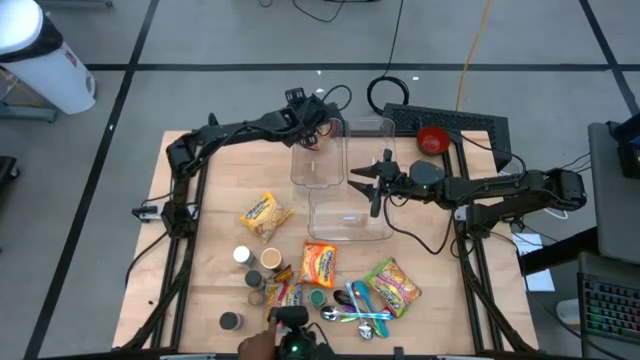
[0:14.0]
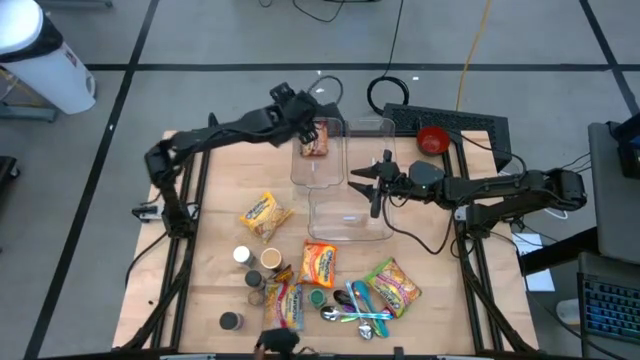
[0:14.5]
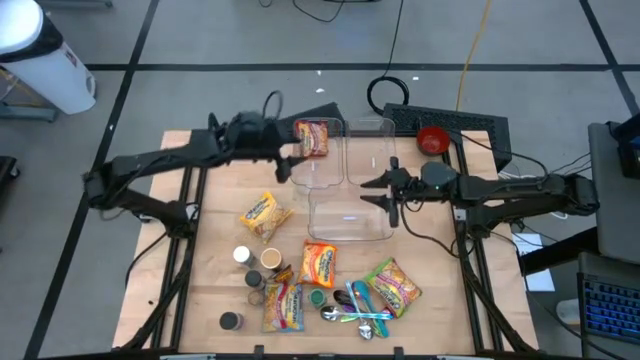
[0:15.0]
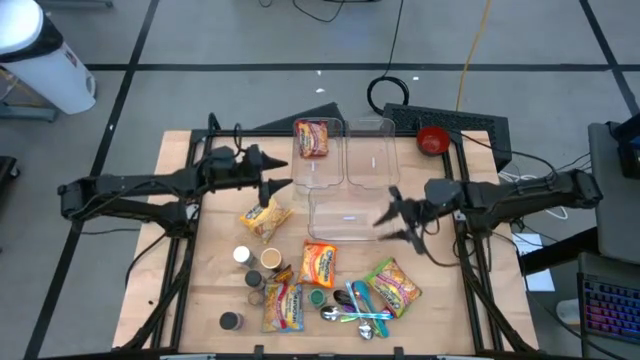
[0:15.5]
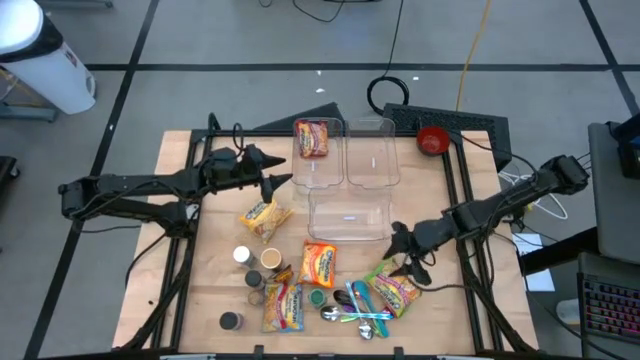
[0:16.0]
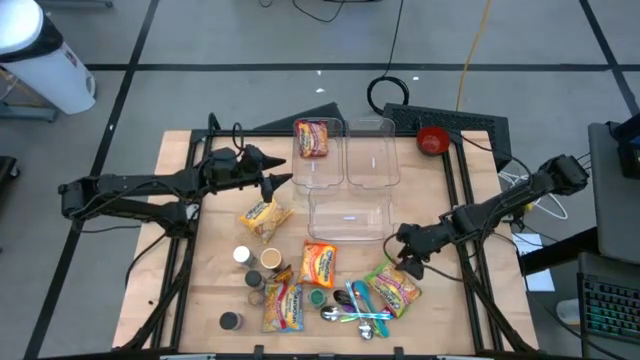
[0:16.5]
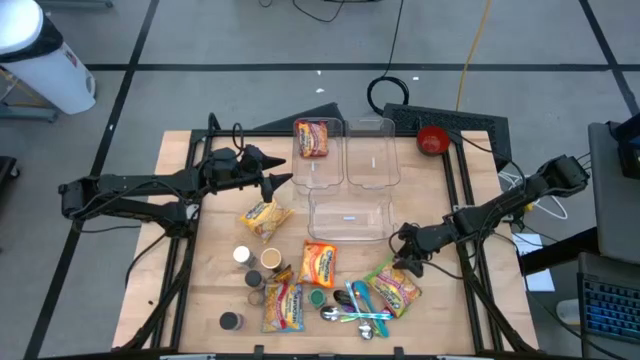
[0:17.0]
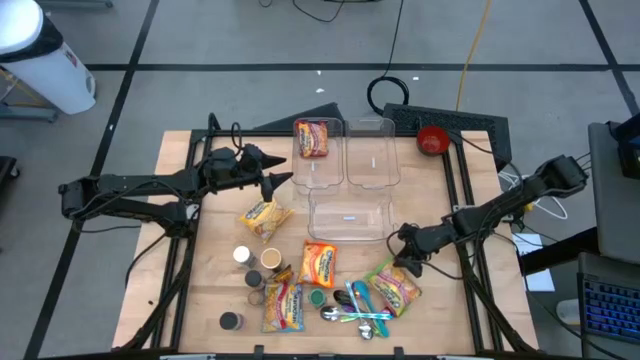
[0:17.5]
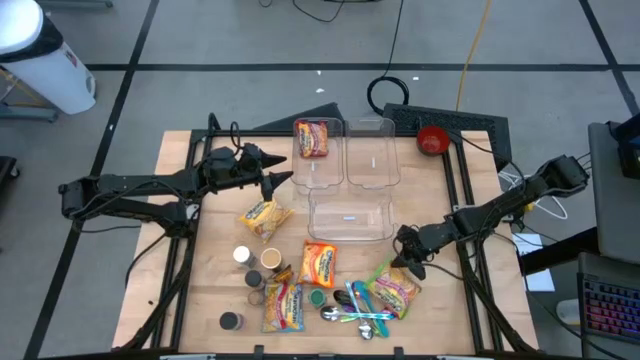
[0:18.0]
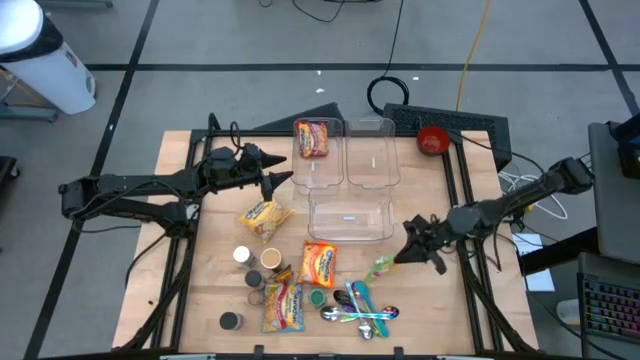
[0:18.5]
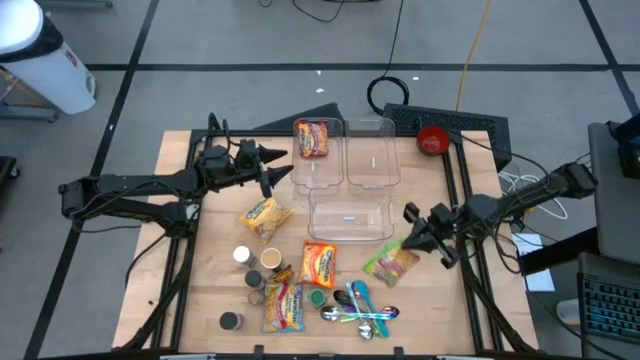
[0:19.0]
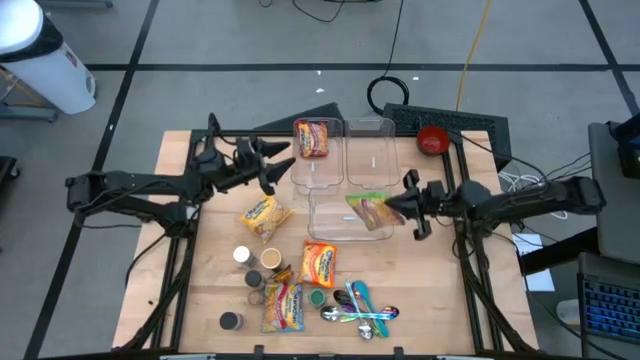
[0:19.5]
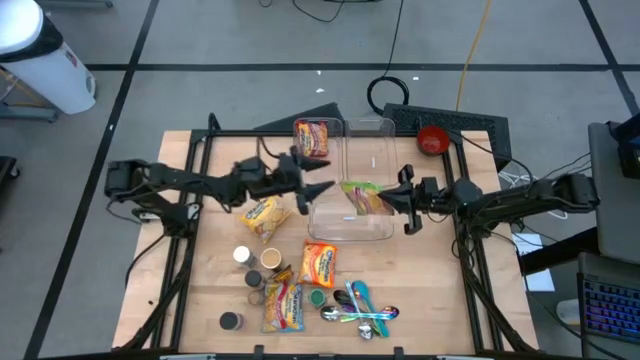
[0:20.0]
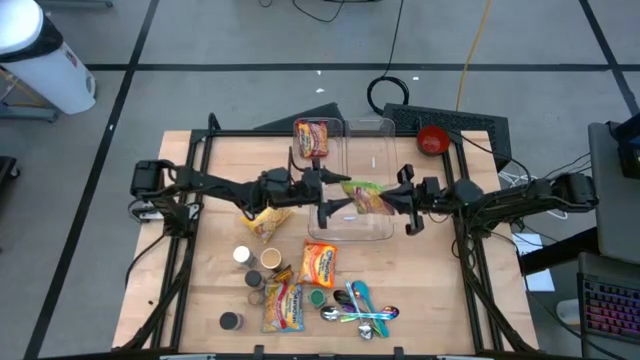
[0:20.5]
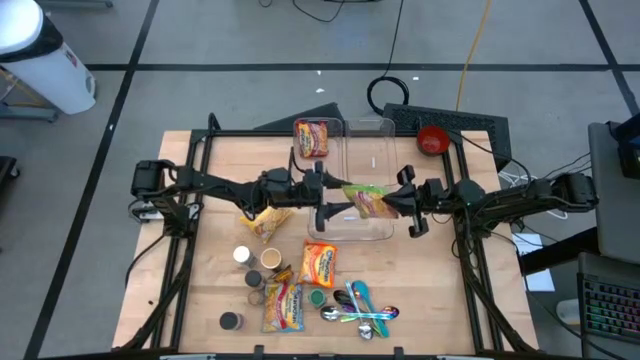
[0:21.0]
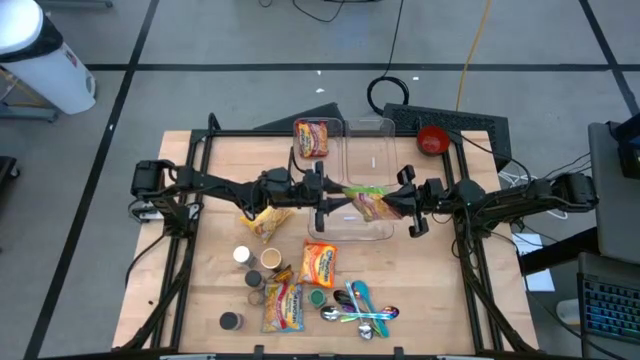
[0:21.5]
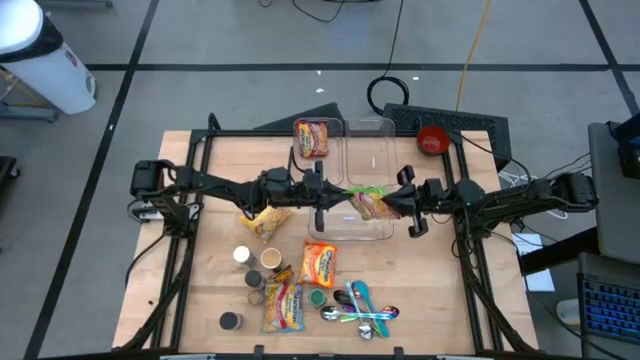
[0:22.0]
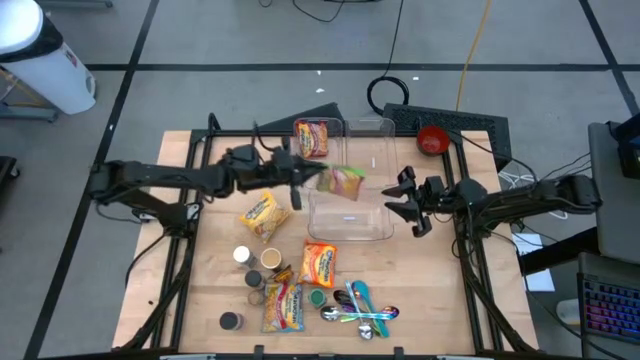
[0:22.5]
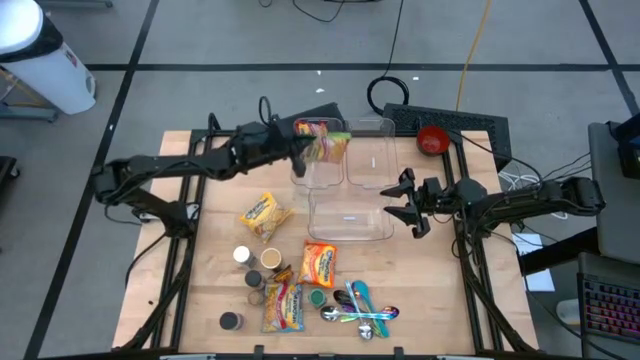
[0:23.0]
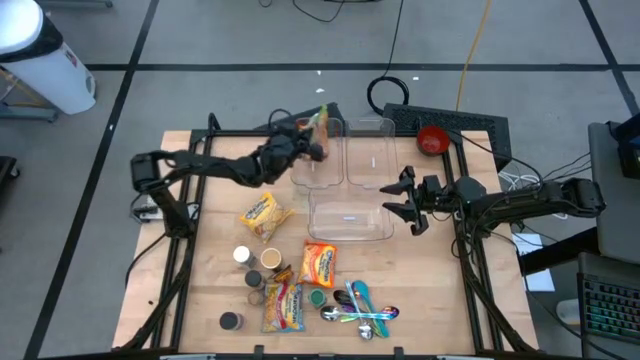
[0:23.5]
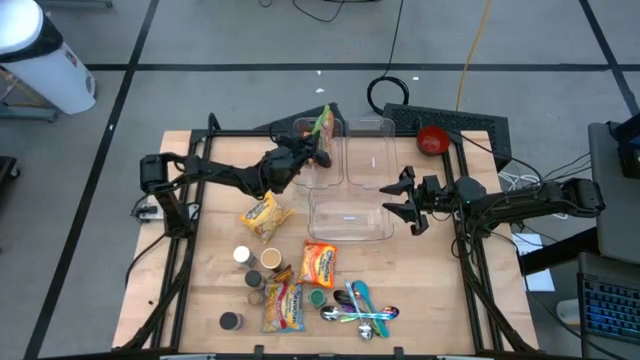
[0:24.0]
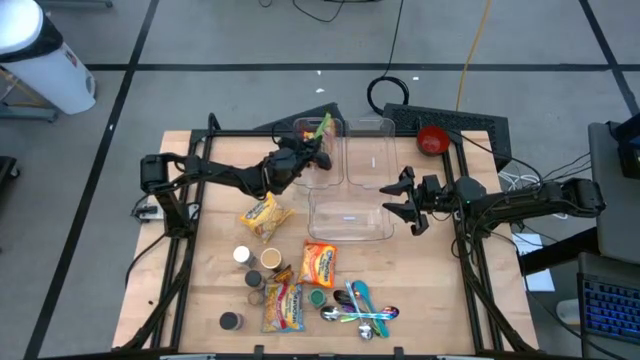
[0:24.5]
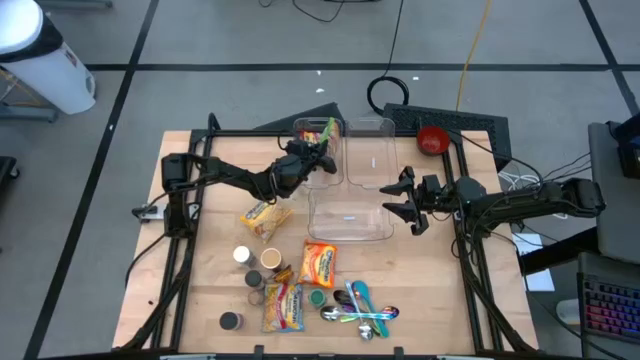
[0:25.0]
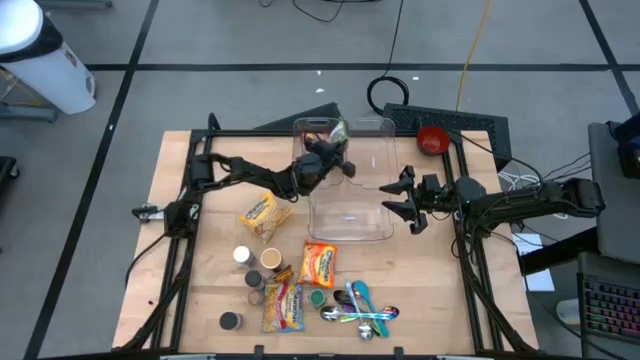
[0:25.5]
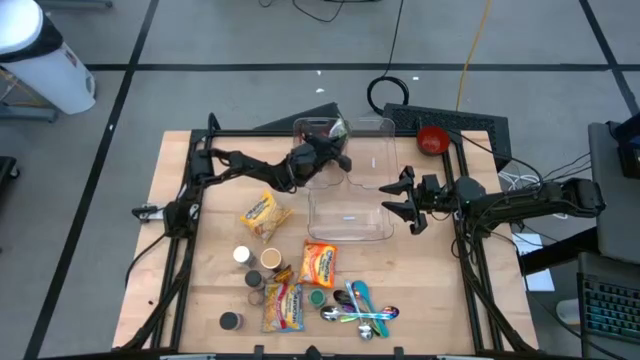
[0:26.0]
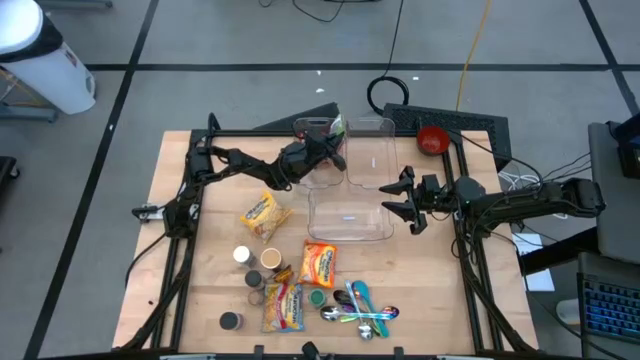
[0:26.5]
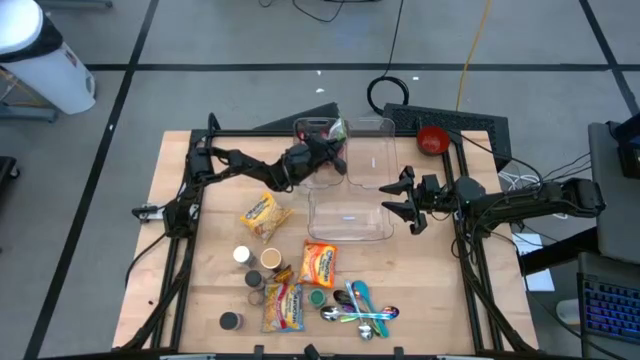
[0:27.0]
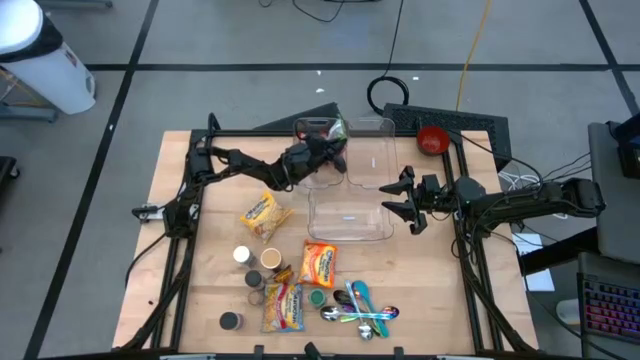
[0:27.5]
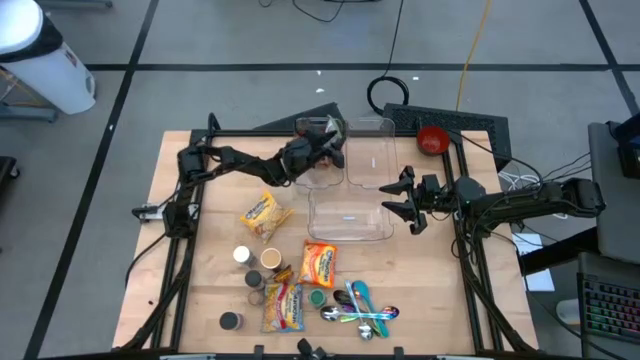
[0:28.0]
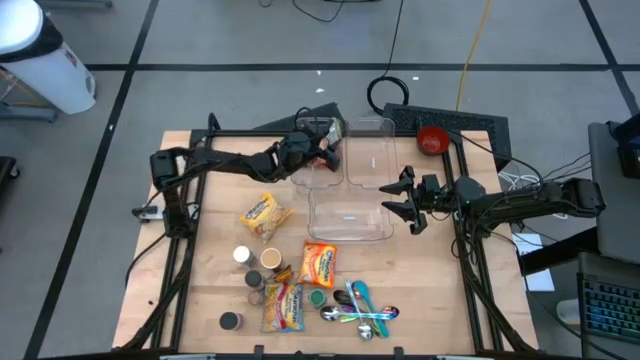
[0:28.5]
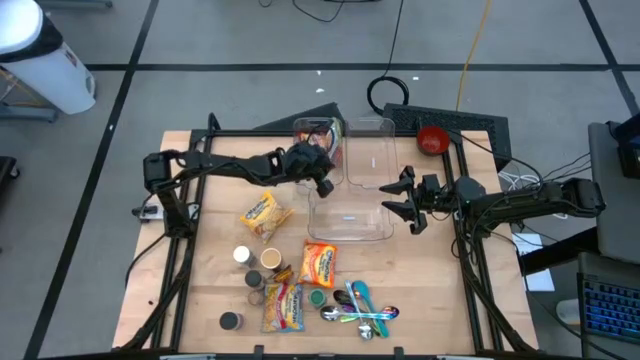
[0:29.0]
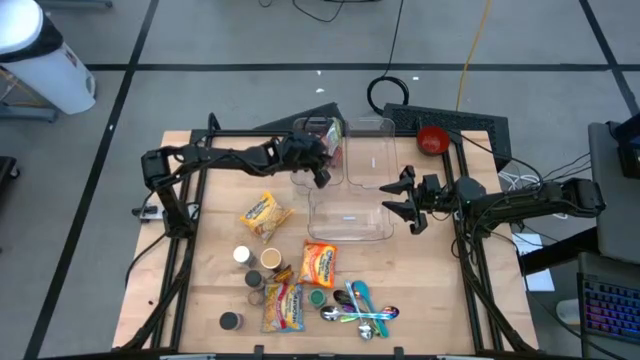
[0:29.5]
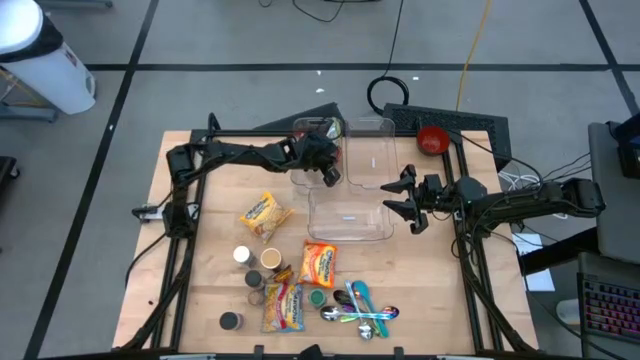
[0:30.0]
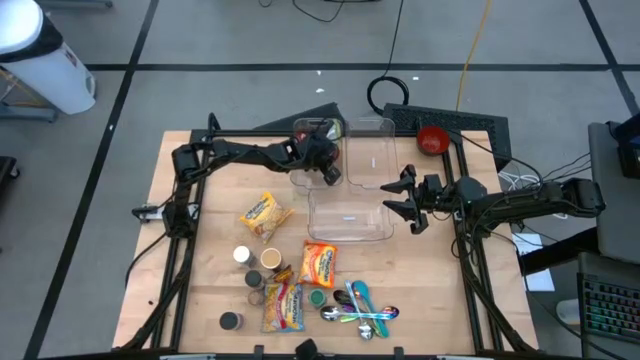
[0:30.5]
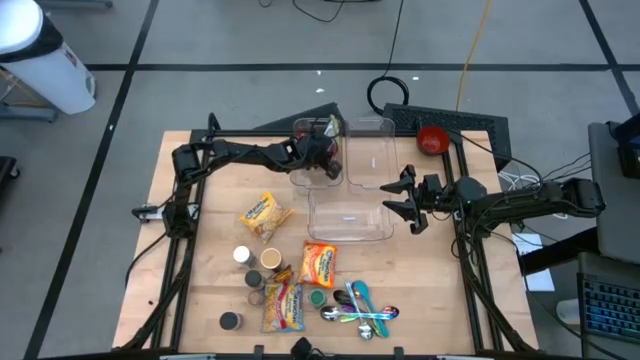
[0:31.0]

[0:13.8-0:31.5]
Task: Pick & Place Food Item
Put the green noodle pack into the left transparent bin

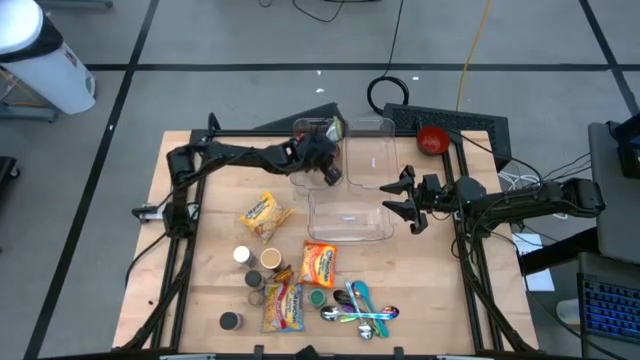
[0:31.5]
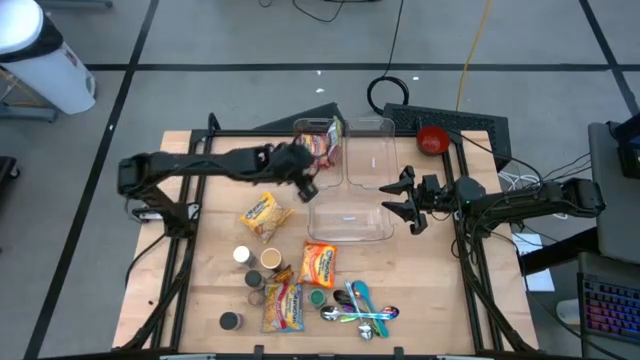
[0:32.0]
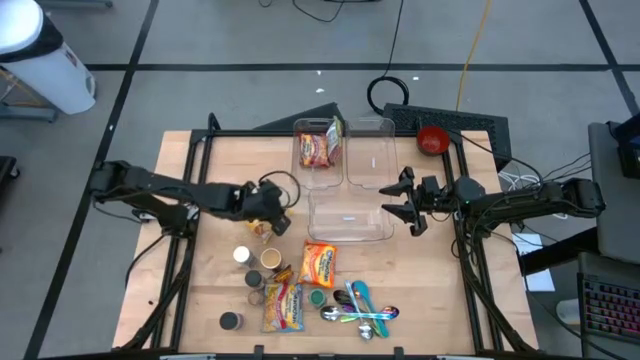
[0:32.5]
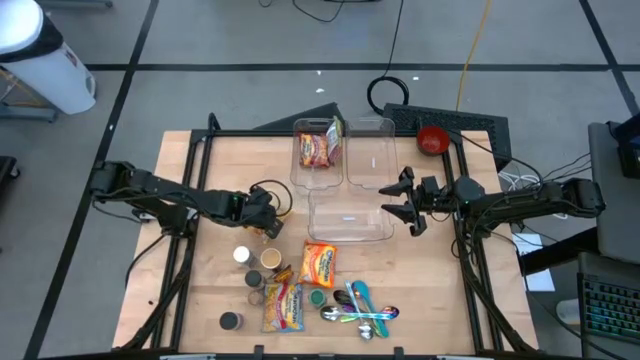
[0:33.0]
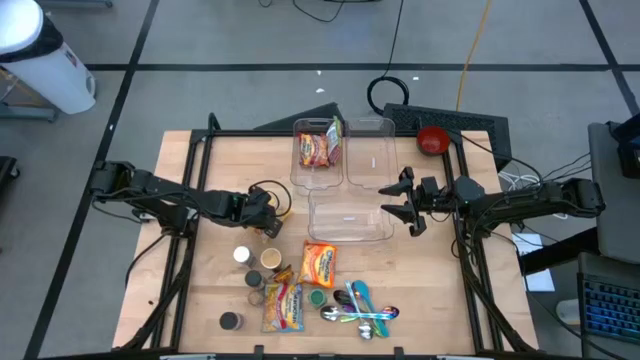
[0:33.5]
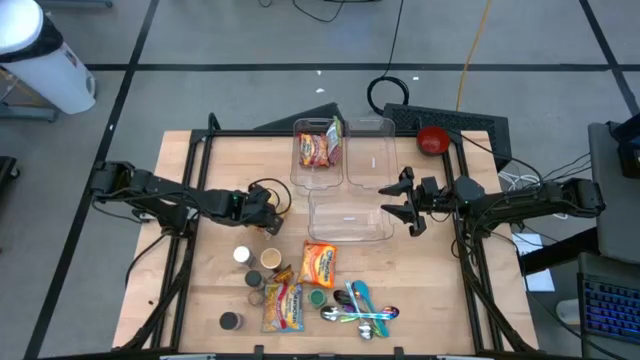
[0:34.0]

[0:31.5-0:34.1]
Put the yellow noodle pack into the left transparent bin
